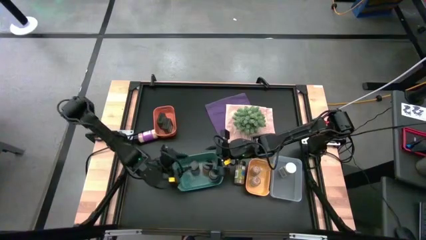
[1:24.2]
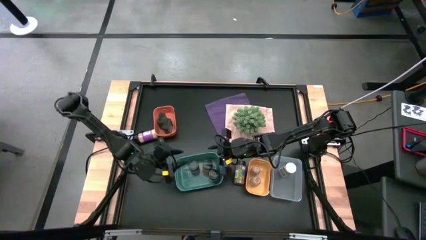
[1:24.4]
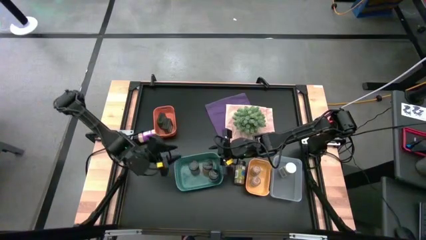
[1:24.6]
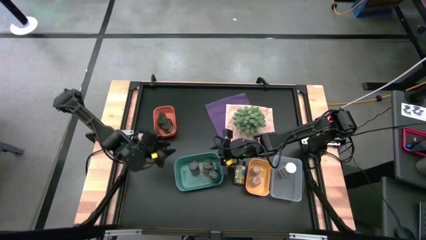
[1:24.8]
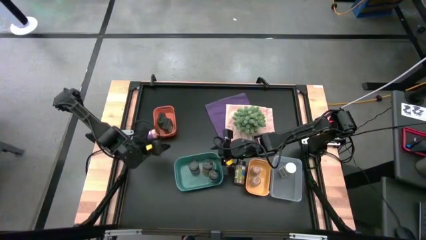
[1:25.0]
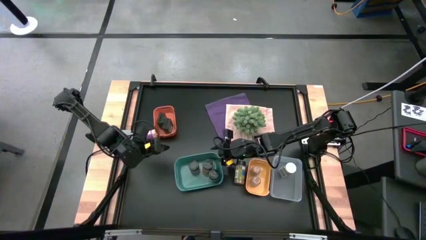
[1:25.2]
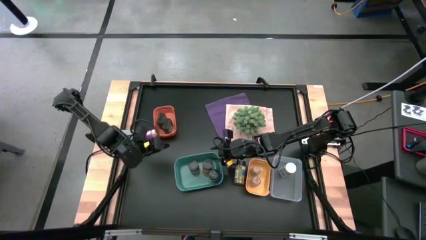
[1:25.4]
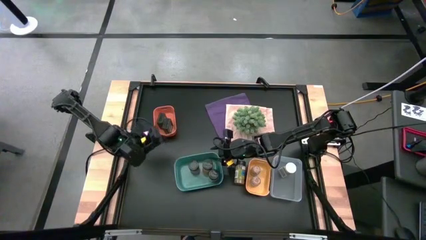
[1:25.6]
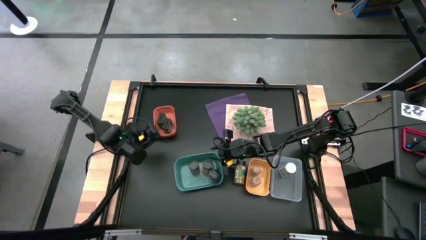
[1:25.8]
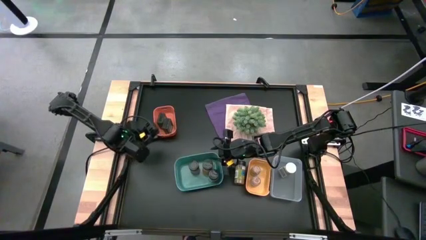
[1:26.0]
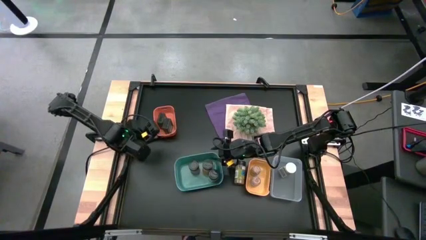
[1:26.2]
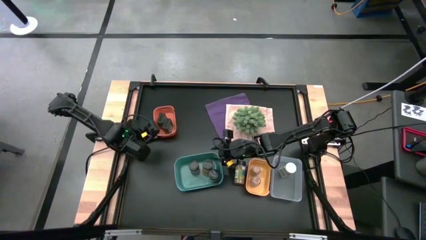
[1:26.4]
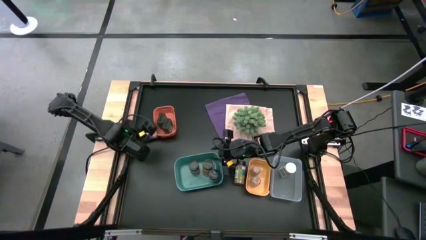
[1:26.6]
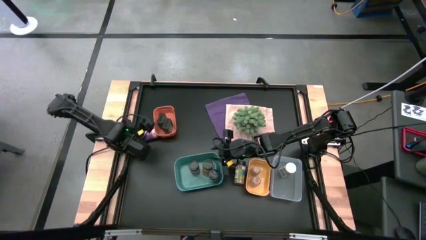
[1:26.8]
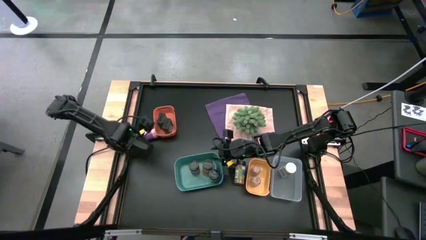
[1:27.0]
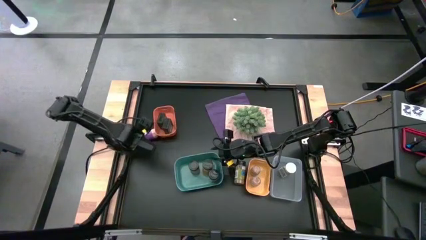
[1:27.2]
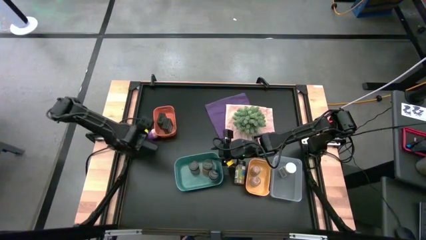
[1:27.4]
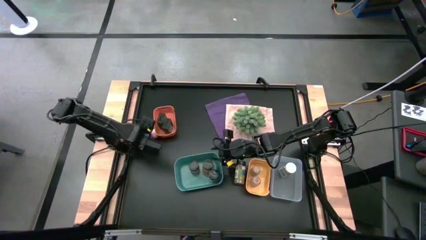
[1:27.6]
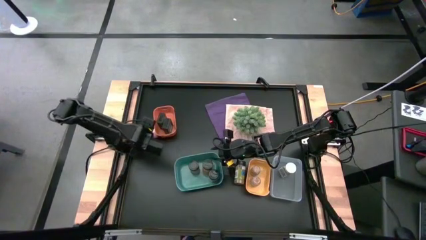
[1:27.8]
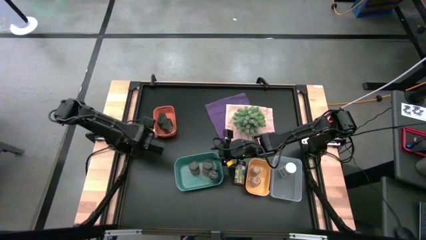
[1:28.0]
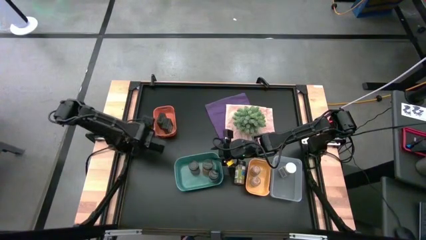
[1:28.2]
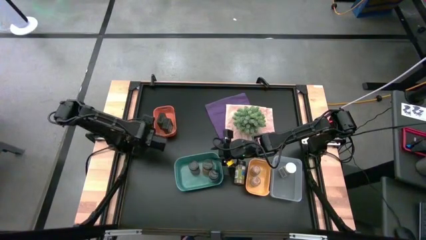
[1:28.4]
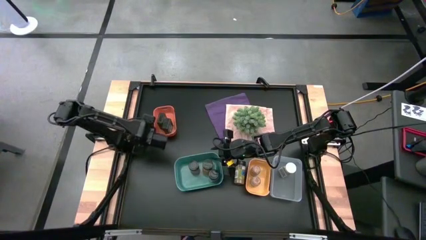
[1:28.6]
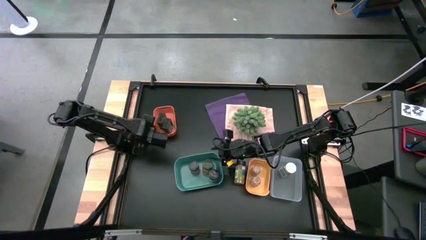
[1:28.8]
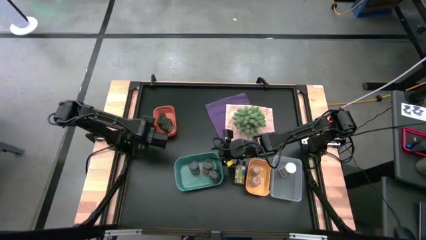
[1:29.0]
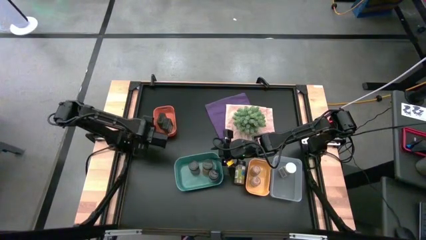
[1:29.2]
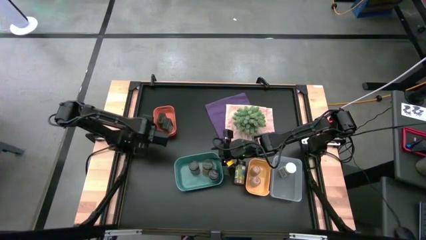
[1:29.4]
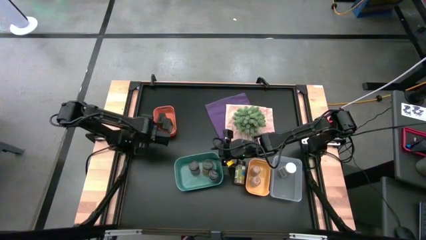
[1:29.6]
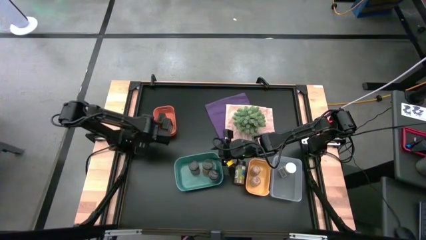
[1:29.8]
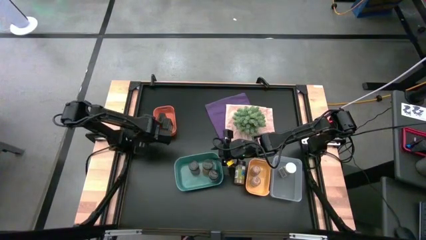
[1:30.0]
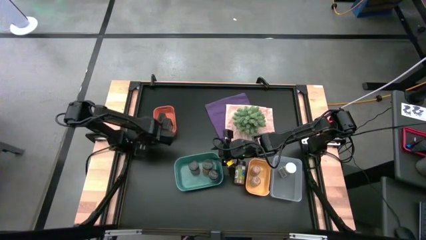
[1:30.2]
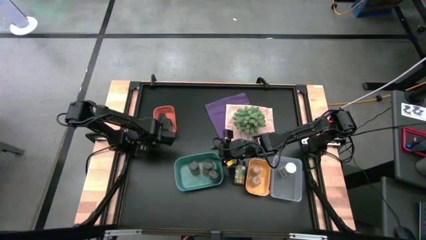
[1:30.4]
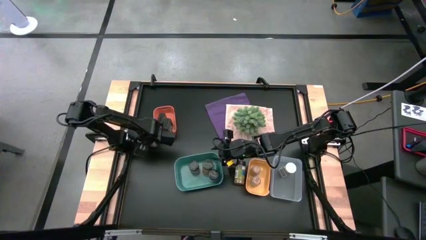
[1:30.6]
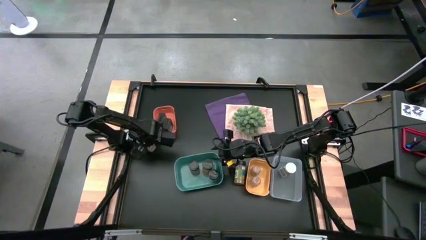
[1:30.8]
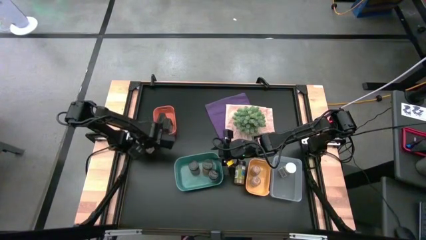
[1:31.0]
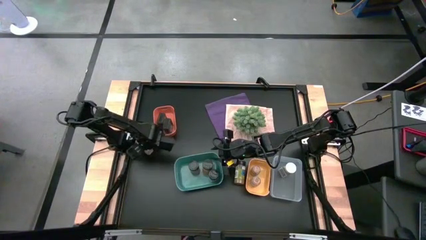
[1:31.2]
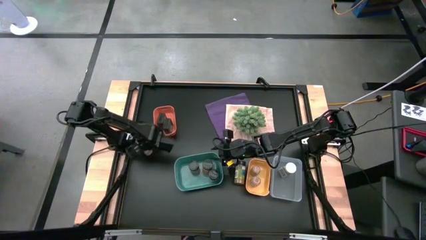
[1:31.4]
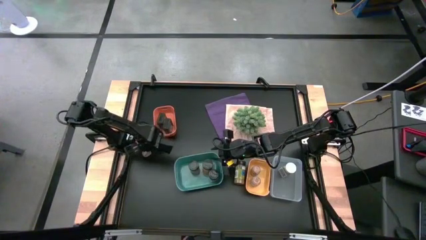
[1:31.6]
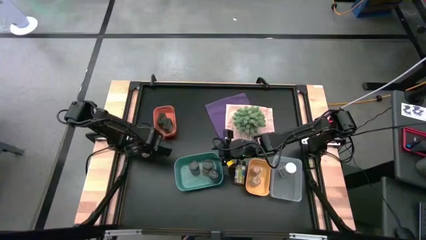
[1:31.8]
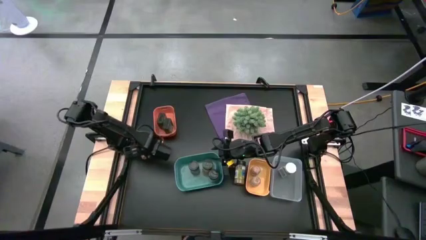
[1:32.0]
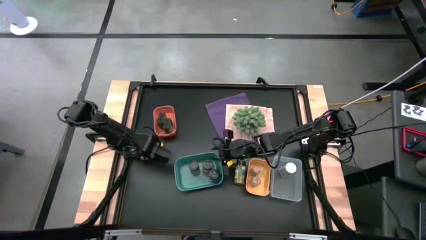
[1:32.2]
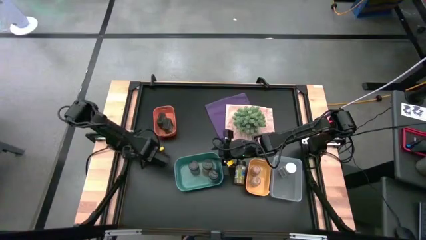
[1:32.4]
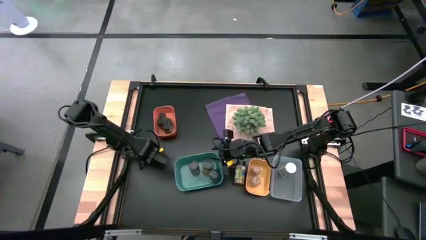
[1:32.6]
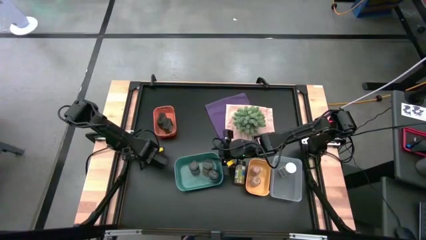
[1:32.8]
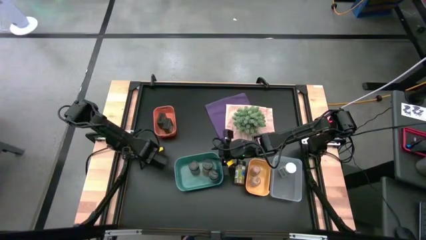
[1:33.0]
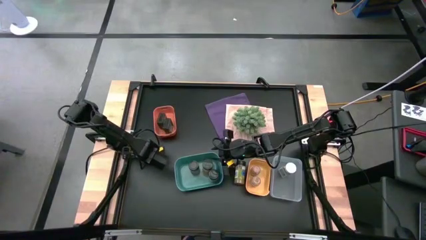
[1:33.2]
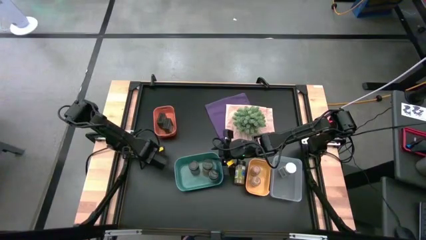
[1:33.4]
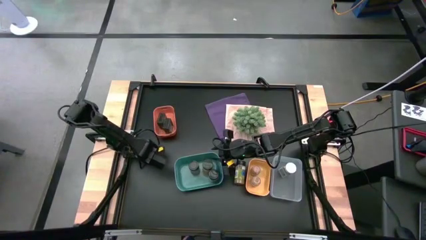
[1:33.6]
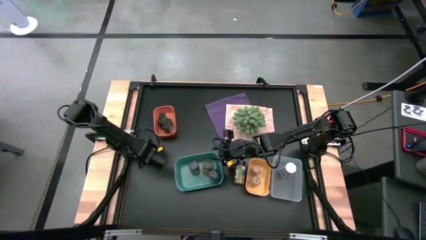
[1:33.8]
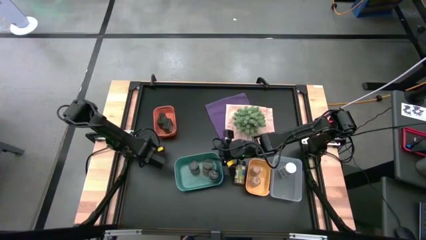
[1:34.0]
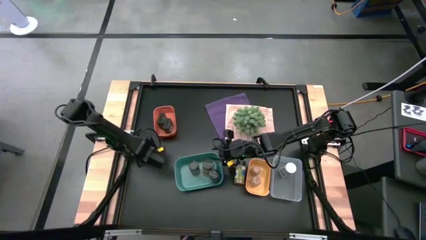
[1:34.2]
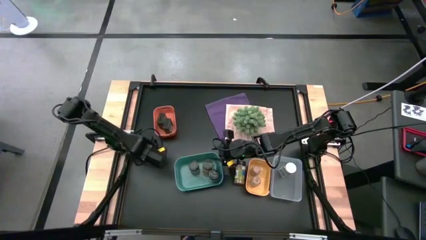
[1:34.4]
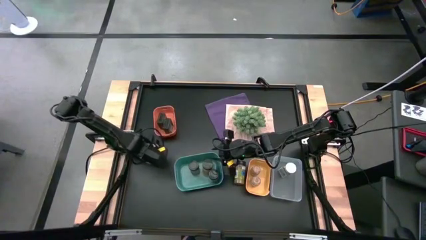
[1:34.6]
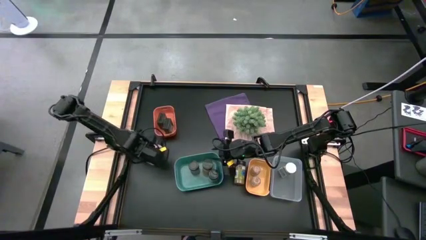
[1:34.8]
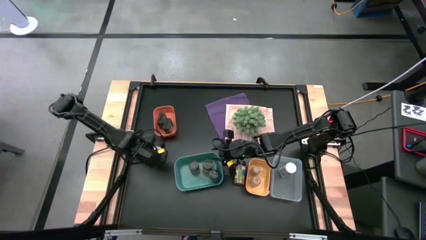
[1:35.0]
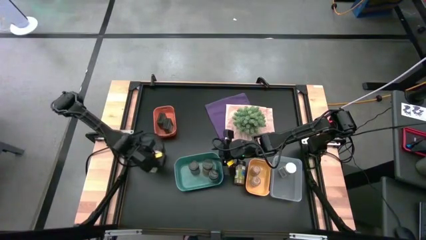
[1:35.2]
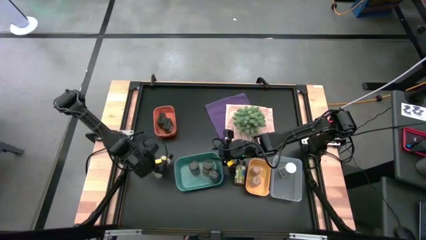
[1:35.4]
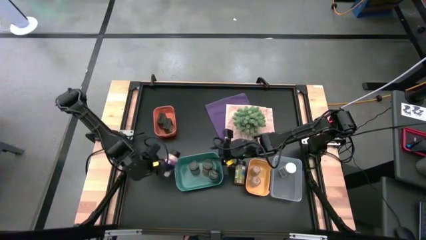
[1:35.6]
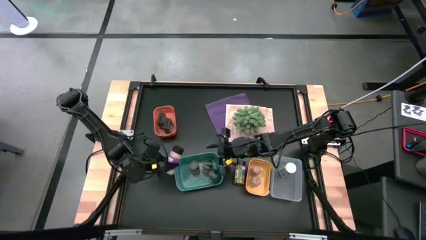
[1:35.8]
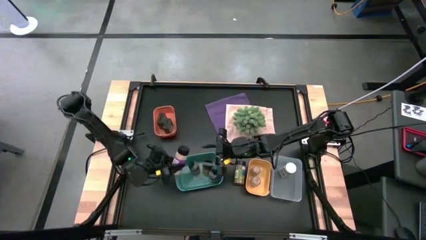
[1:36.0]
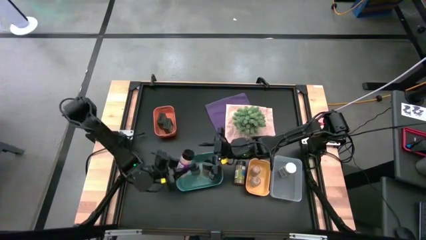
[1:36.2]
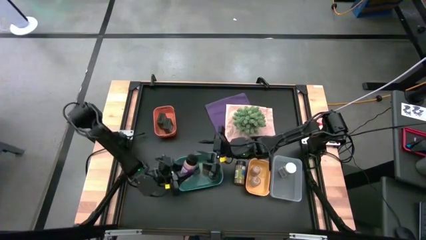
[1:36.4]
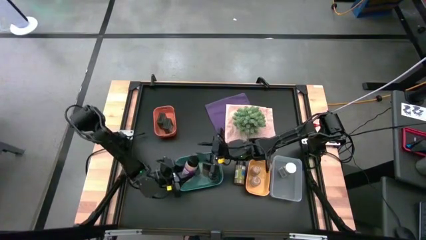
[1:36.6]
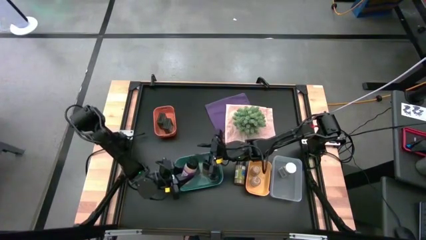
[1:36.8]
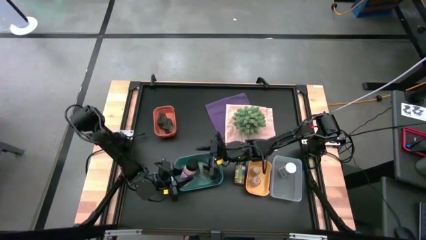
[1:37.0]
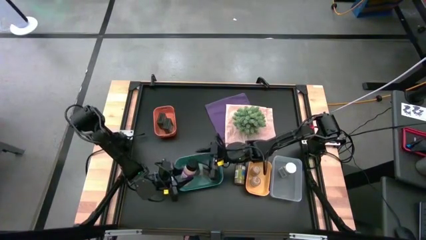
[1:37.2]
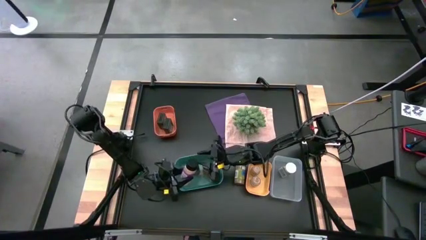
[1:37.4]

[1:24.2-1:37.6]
Task: Sort spices by type
Put the purple seasoning bottle into the blue bin

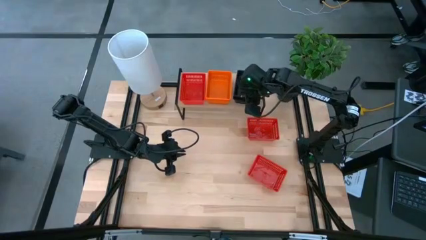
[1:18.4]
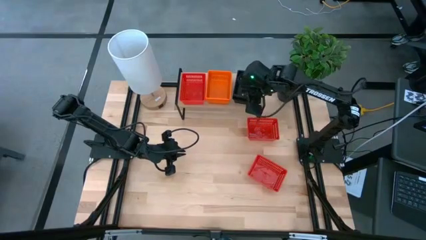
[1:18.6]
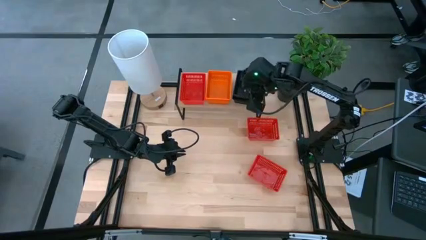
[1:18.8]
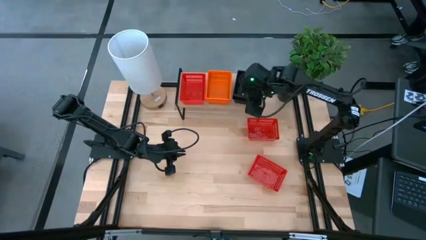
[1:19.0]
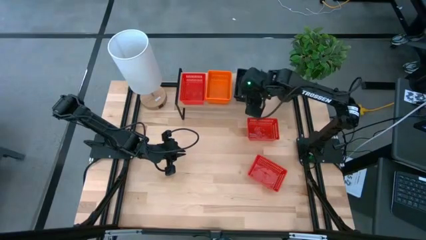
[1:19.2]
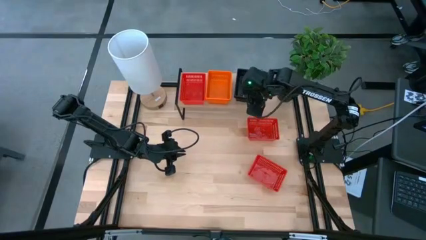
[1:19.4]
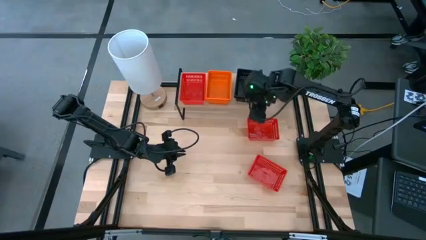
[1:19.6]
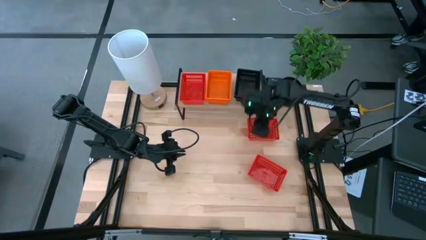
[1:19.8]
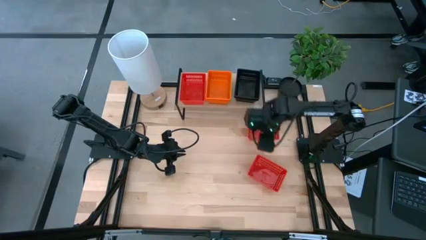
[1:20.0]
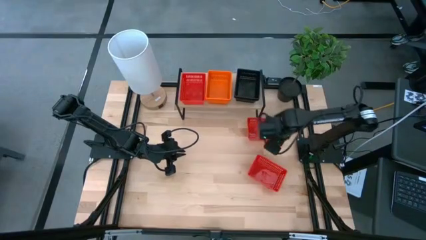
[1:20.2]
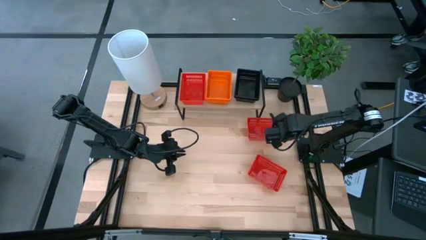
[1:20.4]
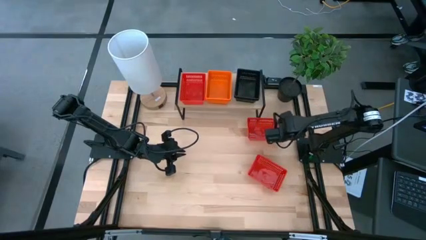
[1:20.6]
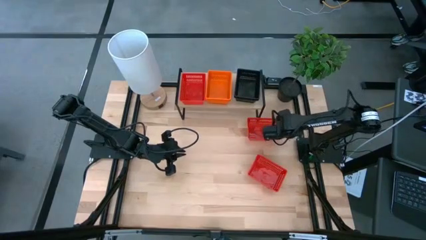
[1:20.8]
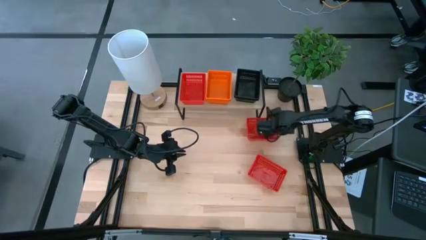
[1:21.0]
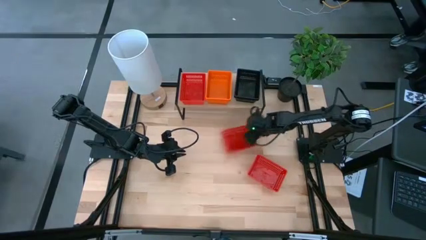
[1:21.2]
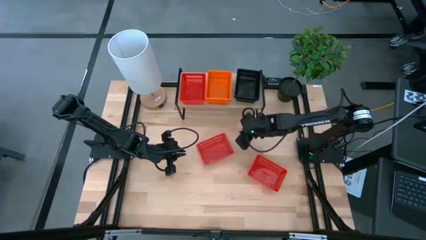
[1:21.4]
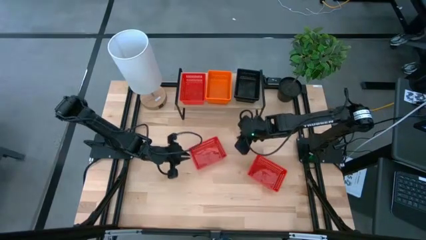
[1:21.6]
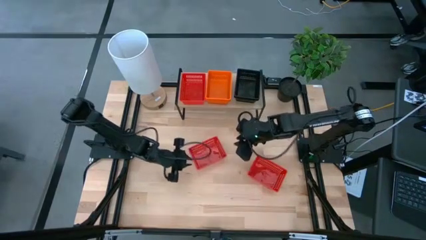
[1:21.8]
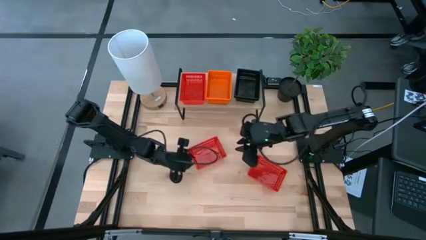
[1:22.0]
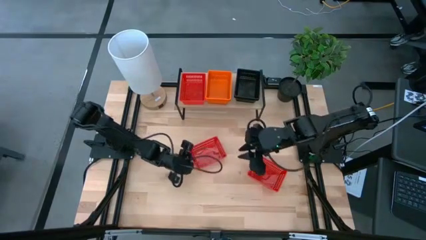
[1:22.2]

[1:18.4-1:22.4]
Task: Stack baskets on shelf by color
Stack the top red basket on the red basket on the shelf
